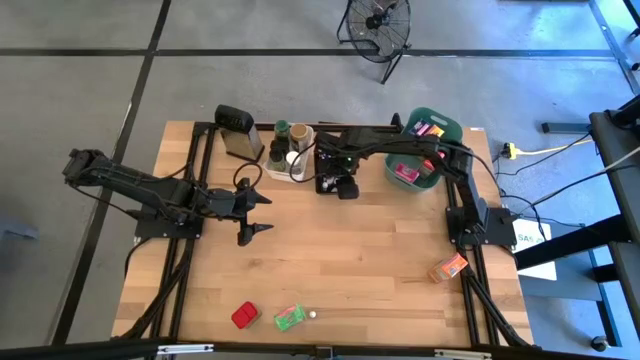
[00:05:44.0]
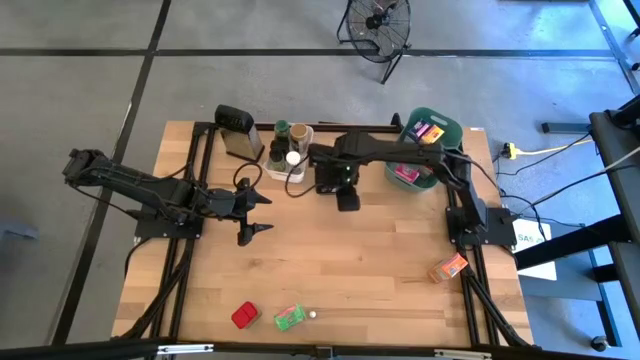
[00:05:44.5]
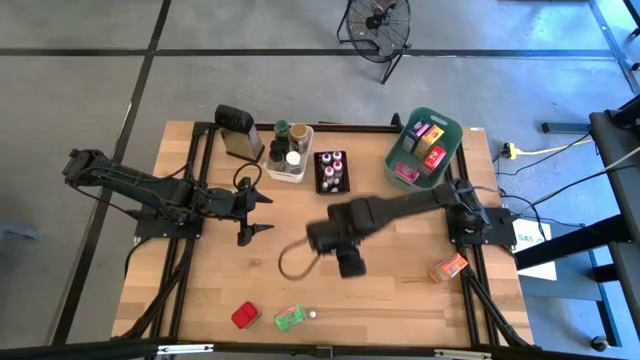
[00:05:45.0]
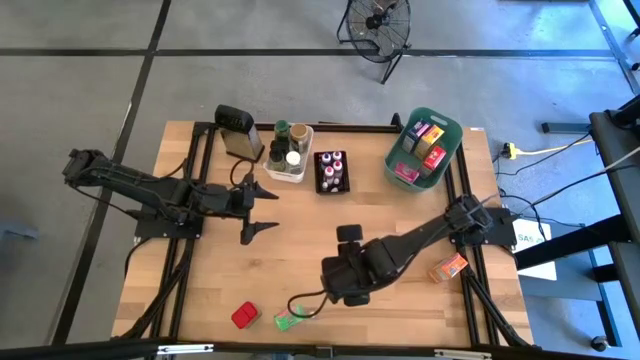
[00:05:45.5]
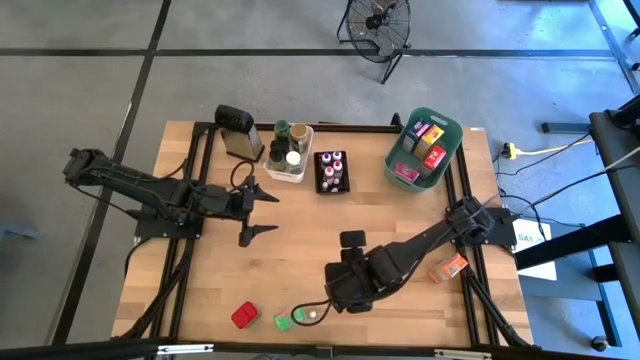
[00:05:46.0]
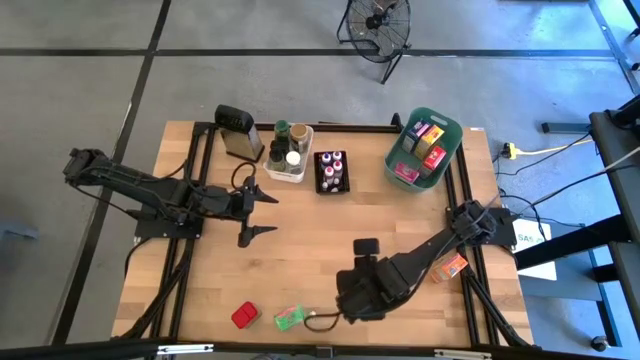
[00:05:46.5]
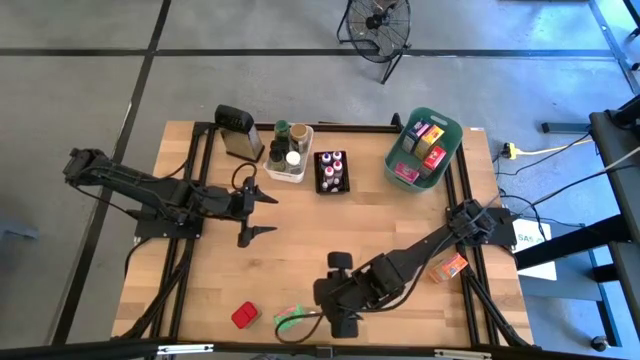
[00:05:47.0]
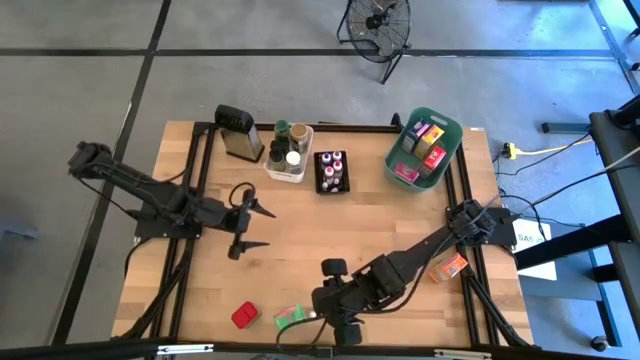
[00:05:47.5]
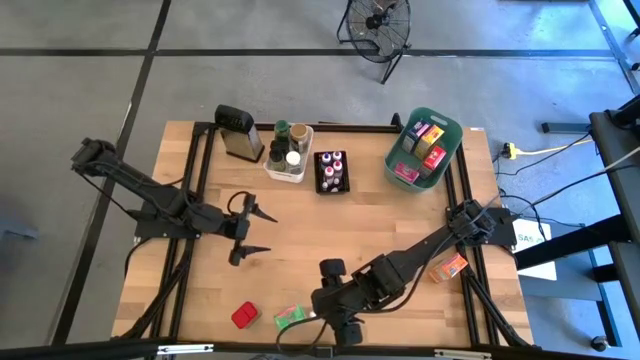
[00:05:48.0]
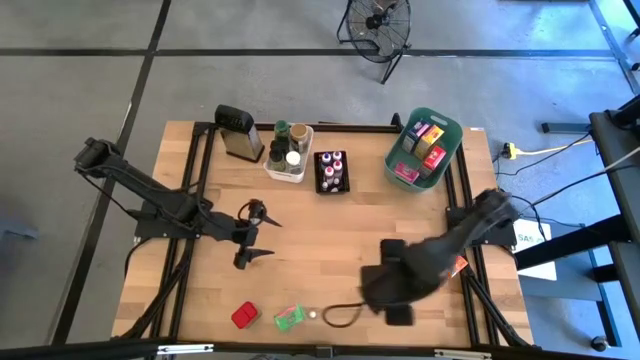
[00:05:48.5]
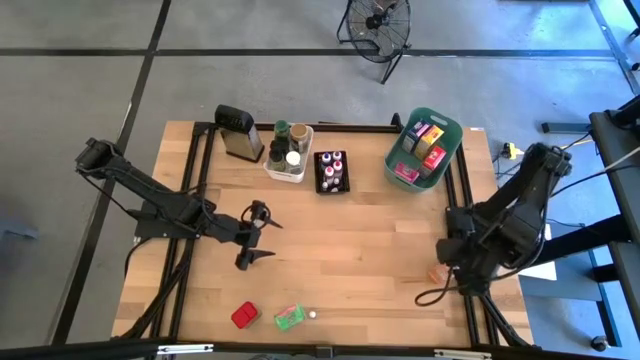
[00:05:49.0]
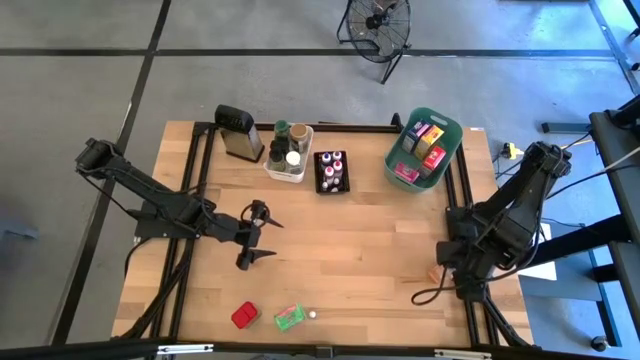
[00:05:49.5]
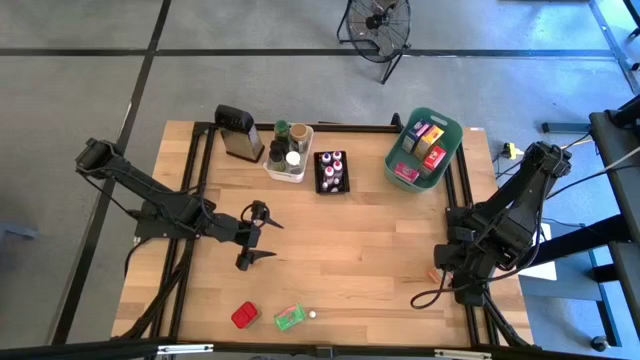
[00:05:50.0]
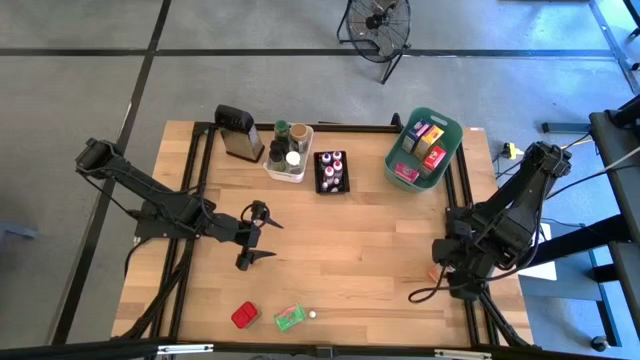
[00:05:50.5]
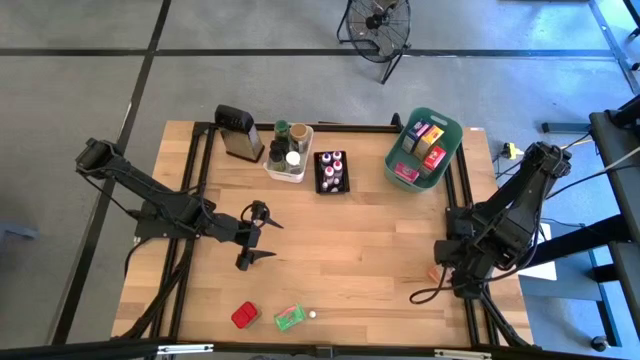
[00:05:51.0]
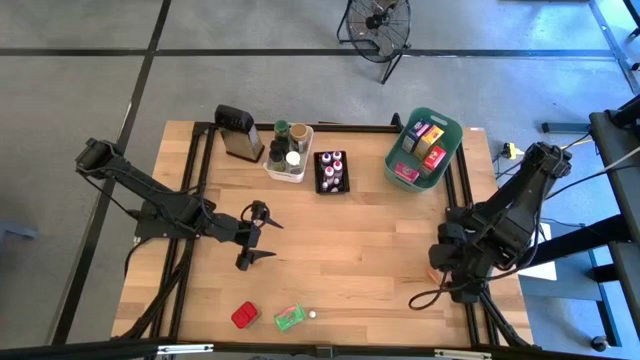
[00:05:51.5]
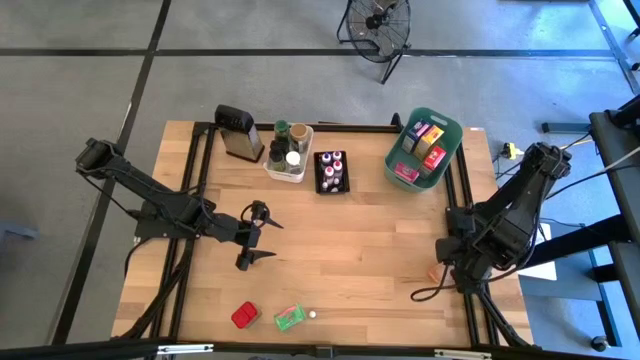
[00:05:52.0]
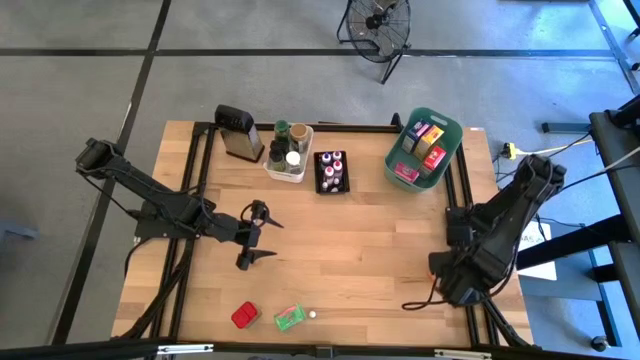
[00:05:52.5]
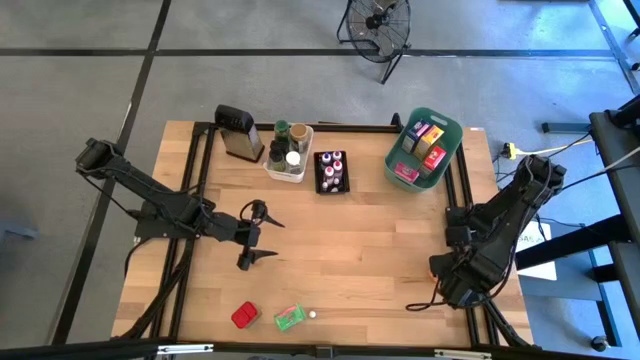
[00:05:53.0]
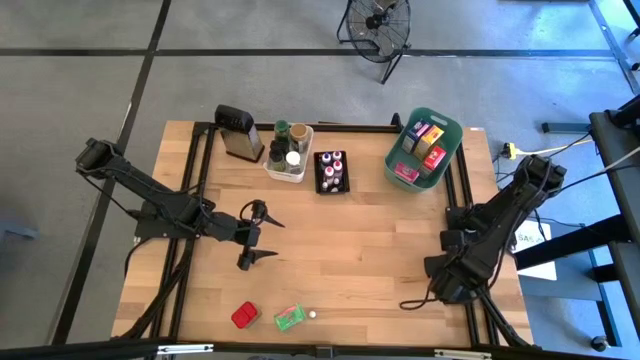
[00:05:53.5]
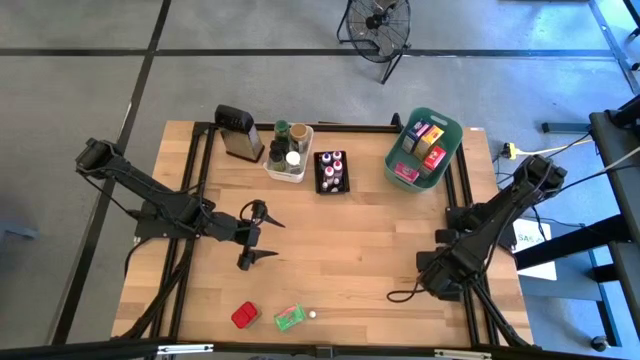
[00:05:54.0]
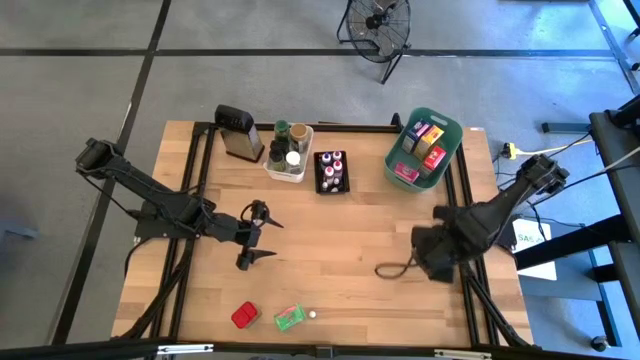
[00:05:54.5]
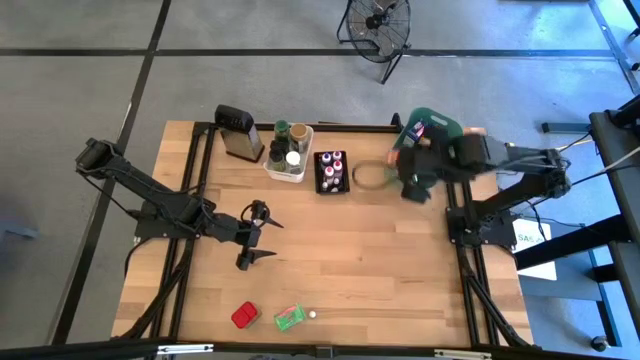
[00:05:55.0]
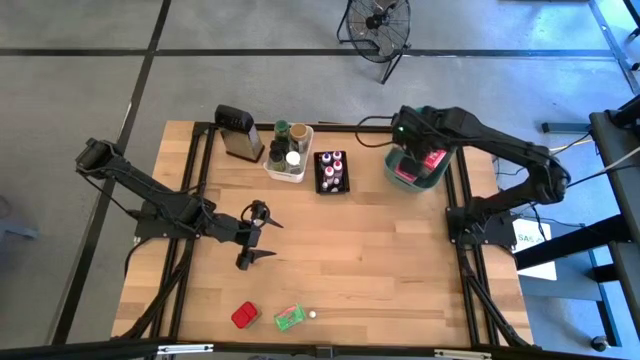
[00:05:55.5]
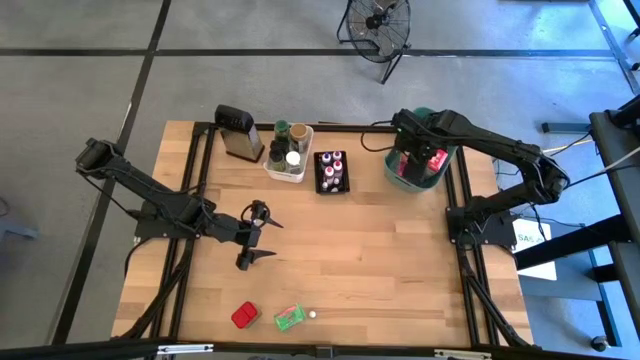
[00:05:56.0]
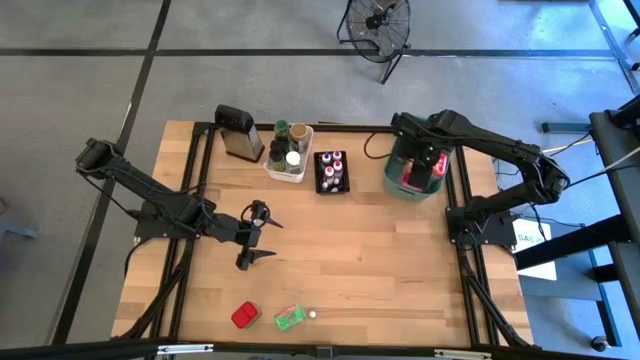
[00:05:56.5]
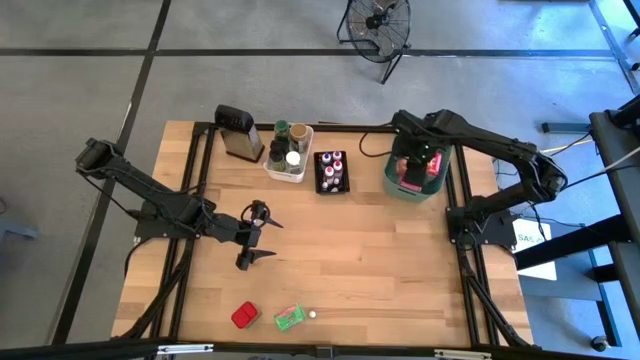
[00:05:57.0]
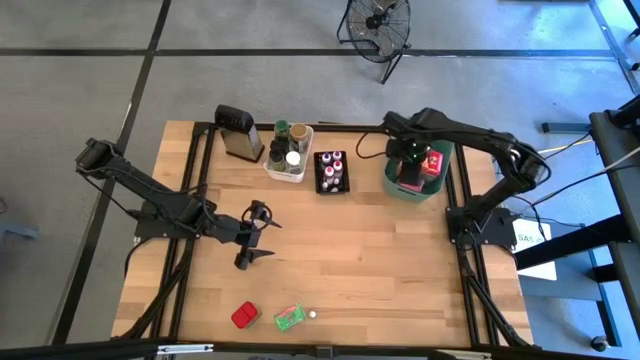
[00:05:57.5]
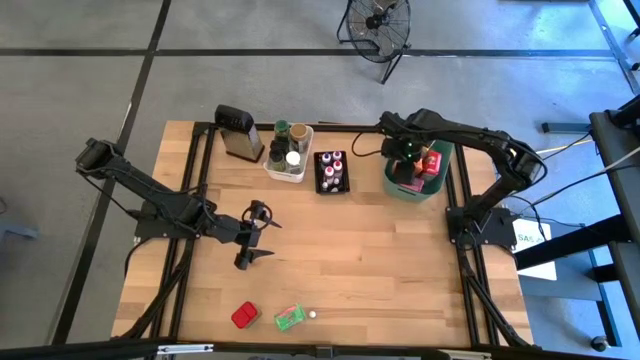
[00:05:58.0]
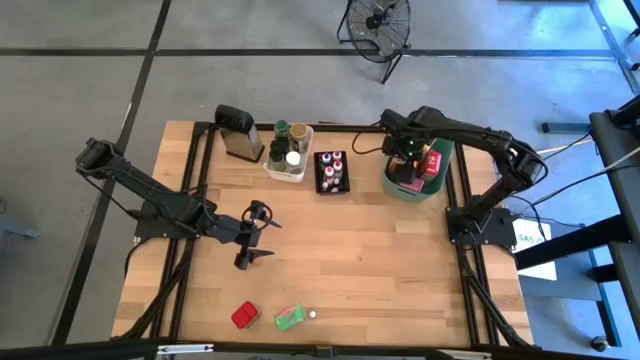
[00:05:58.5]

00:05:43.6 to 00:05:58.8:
Task: Pick & Place Kitchen Items
Put the orange cereal box into the green bin

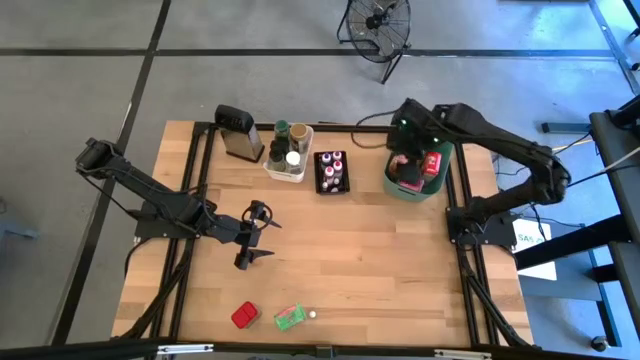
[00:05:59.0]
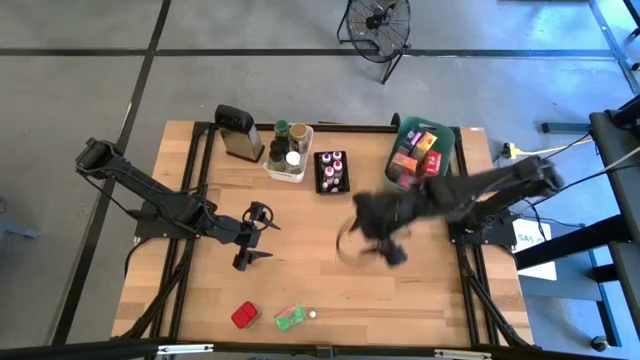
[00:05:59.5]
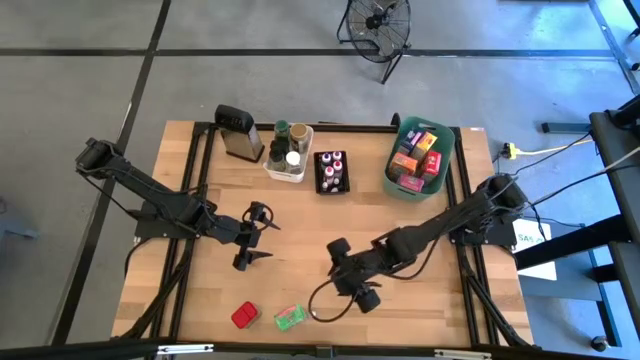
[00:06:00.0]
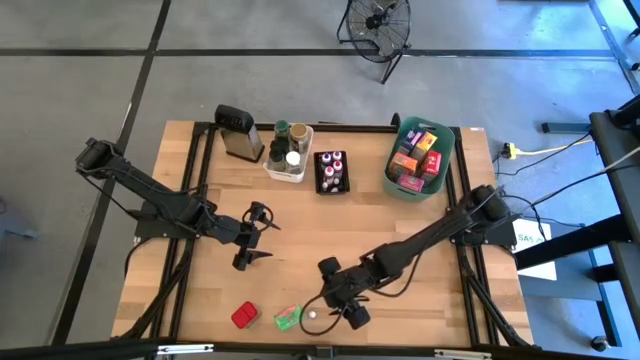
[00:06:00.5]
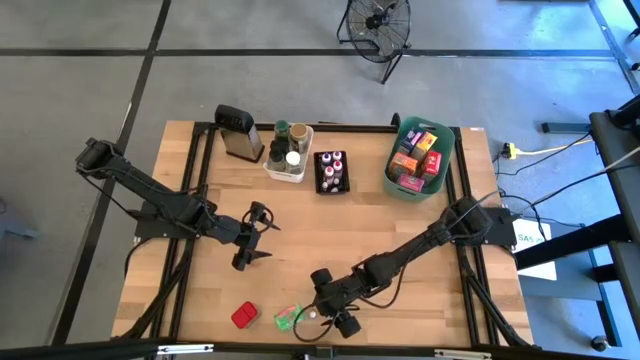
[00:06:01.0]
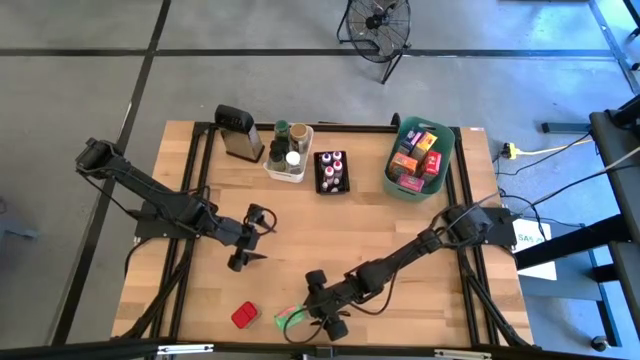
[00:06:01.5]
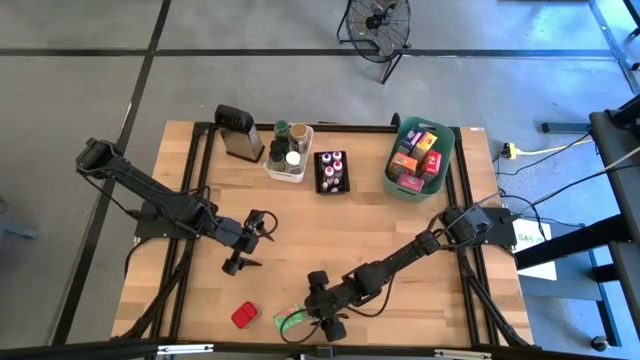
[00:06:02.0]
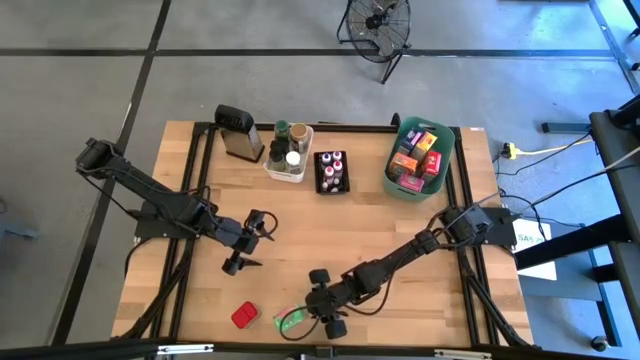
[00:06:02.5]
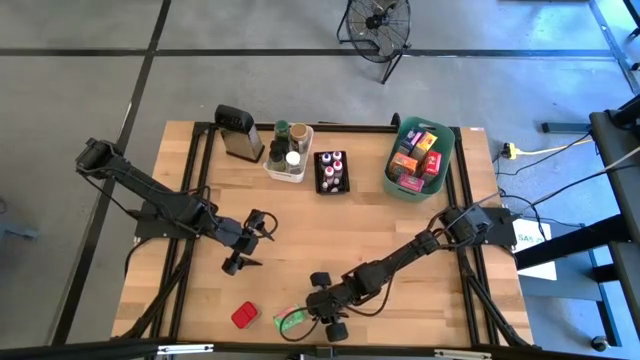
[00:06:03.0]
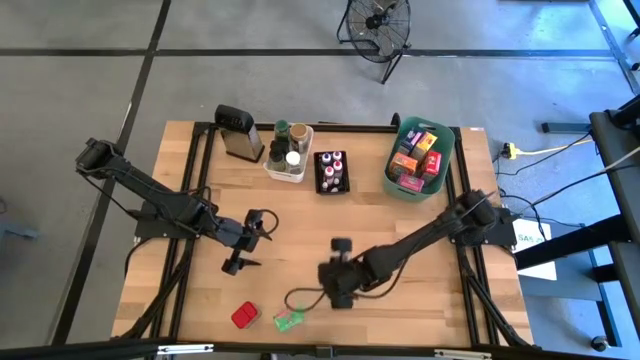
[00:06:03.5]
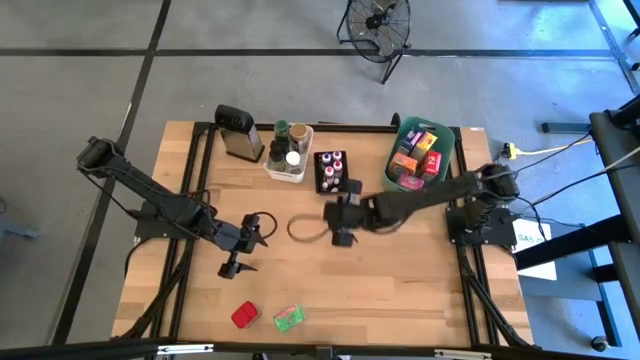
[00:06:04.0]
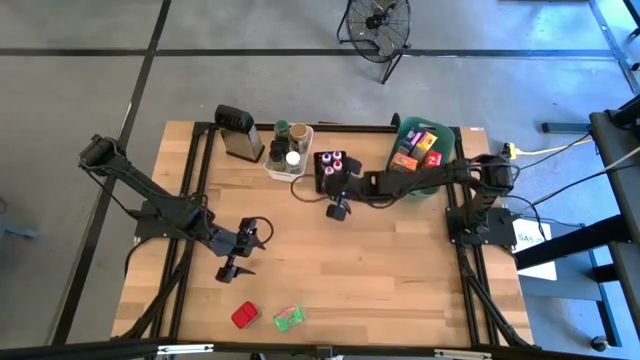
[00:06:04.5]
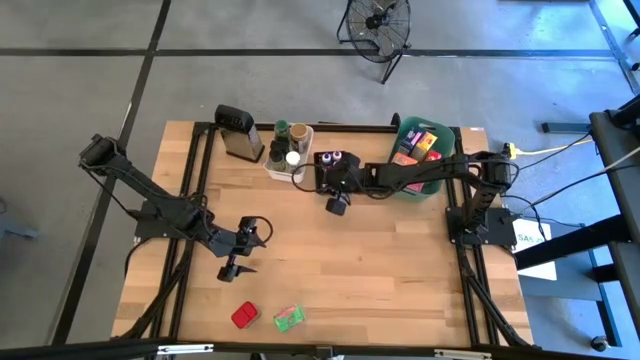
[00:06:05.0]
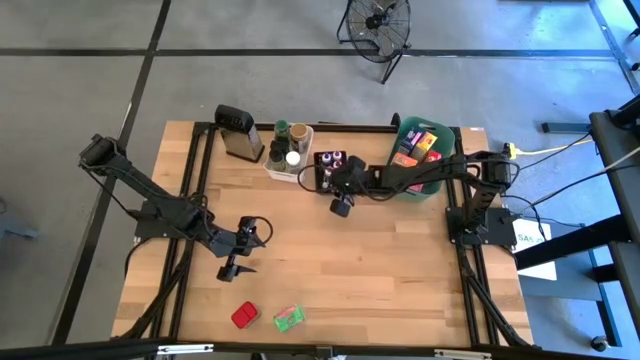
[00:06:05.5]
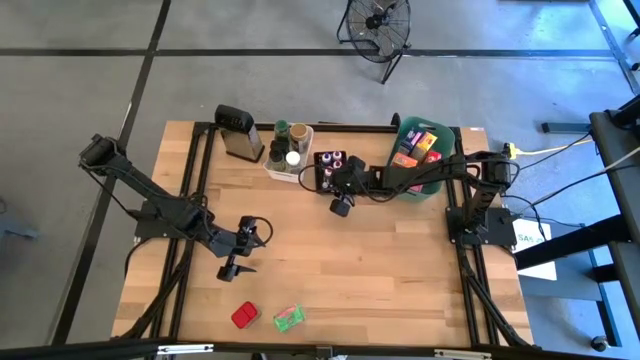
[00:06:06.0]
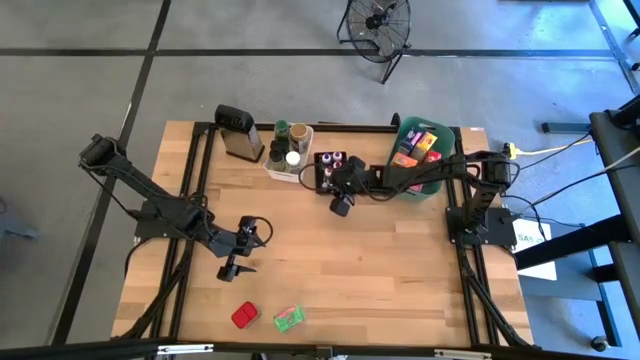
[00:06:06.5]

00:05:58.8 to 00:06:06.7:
Put the small black food coloring bottle into the black bin
